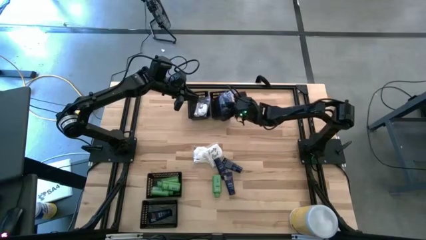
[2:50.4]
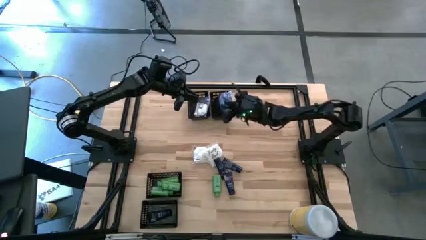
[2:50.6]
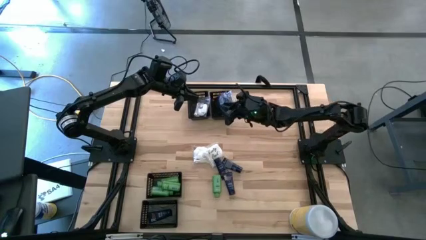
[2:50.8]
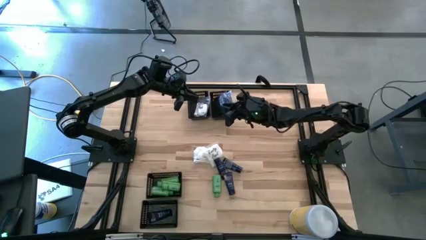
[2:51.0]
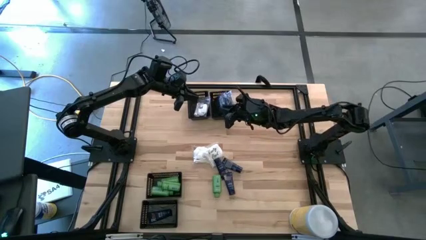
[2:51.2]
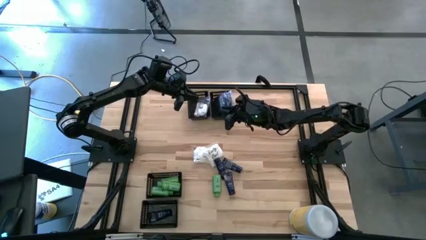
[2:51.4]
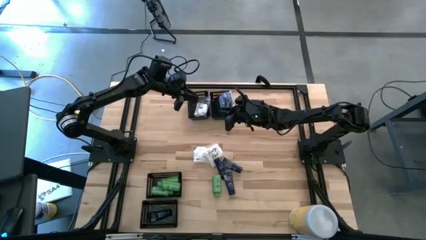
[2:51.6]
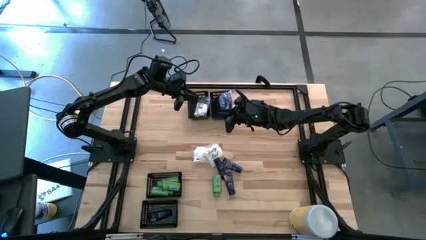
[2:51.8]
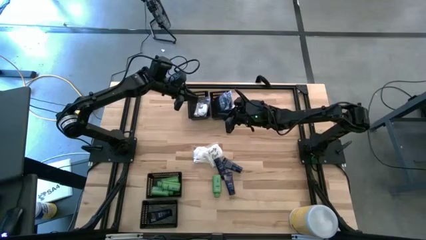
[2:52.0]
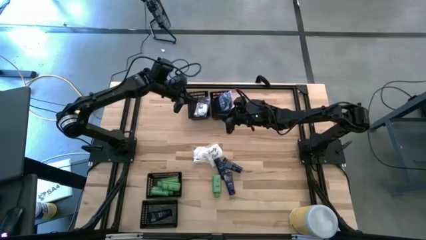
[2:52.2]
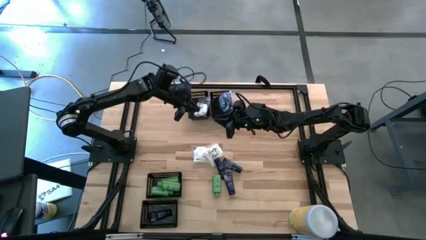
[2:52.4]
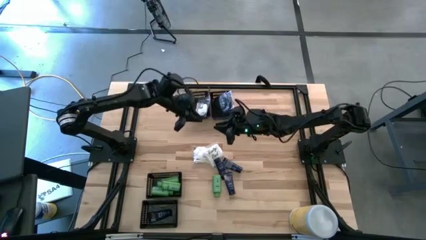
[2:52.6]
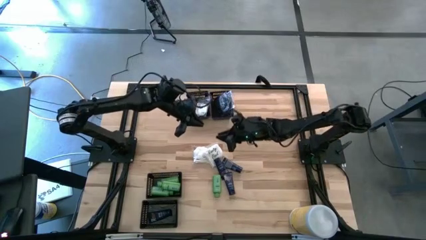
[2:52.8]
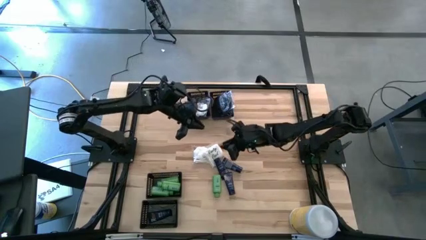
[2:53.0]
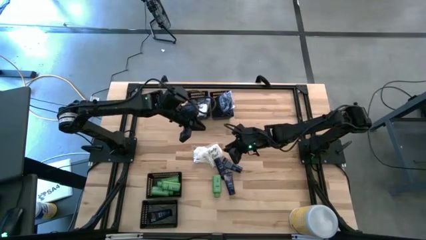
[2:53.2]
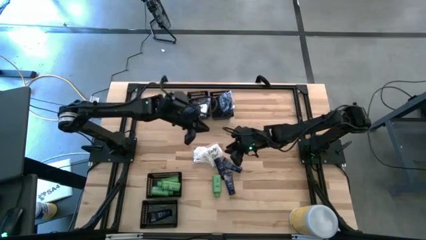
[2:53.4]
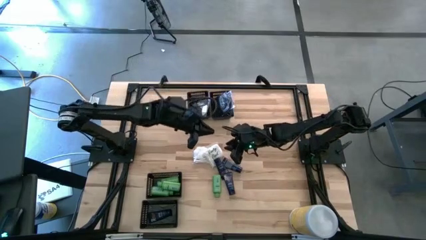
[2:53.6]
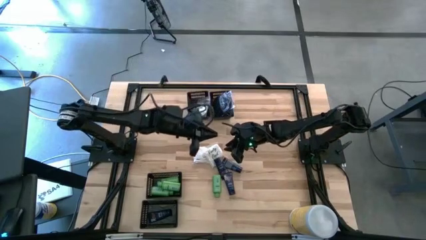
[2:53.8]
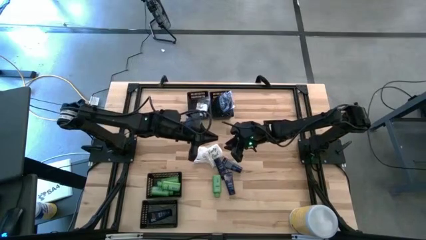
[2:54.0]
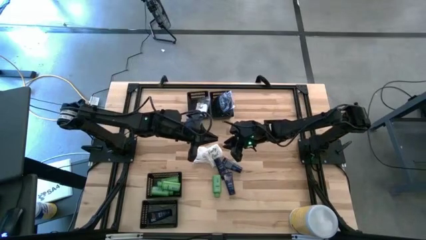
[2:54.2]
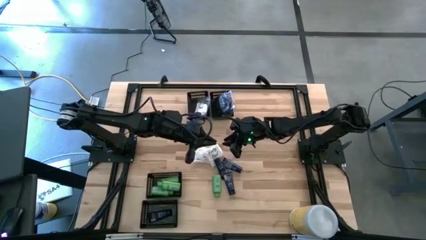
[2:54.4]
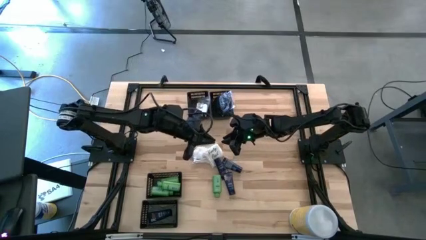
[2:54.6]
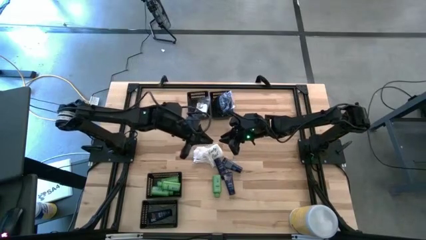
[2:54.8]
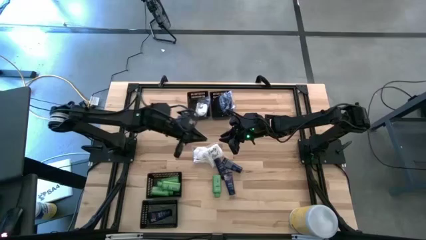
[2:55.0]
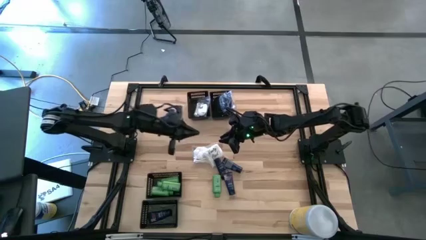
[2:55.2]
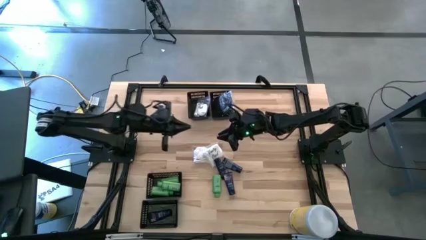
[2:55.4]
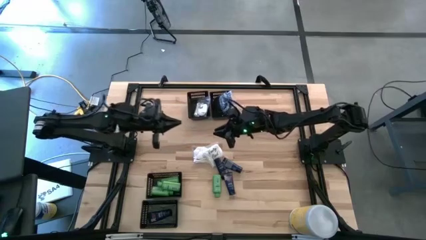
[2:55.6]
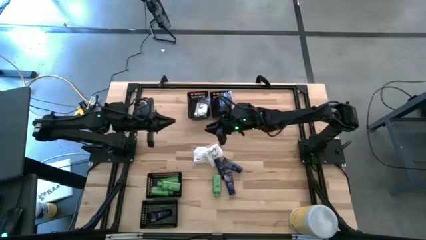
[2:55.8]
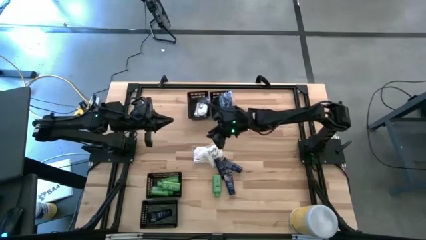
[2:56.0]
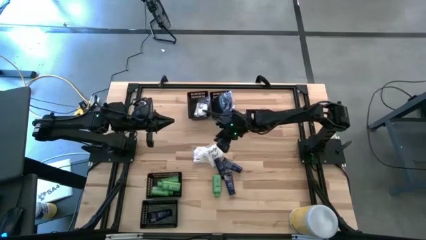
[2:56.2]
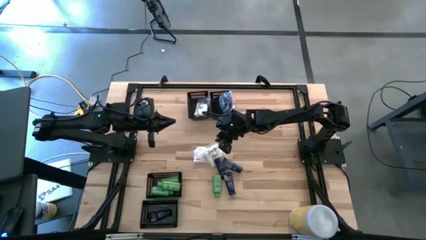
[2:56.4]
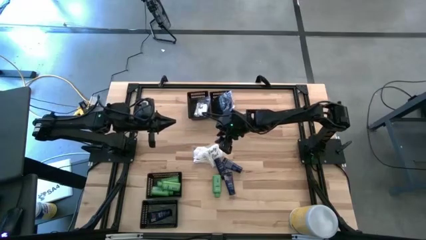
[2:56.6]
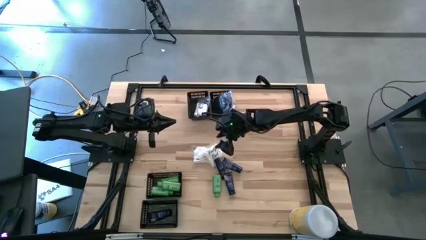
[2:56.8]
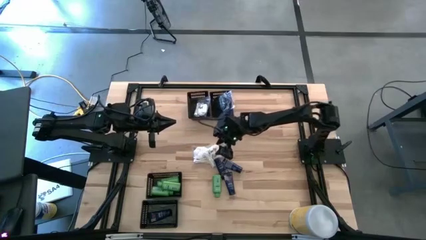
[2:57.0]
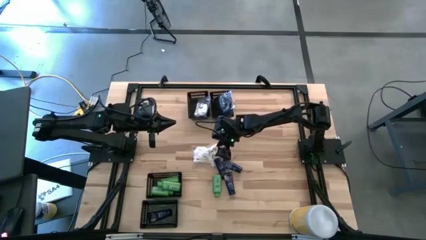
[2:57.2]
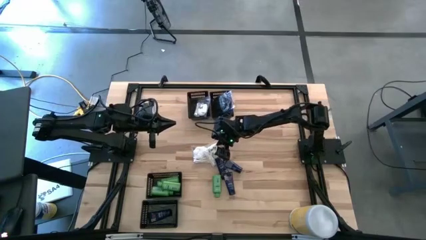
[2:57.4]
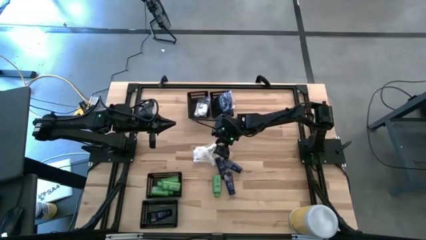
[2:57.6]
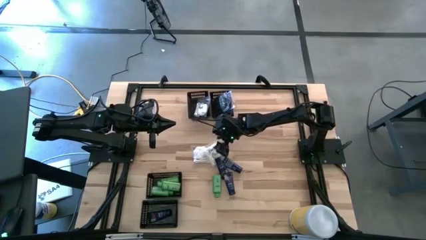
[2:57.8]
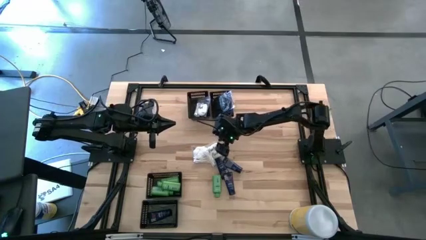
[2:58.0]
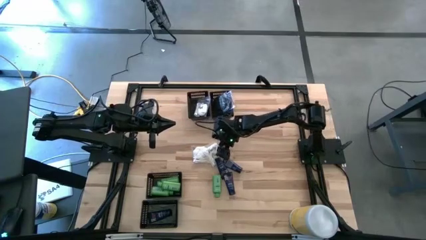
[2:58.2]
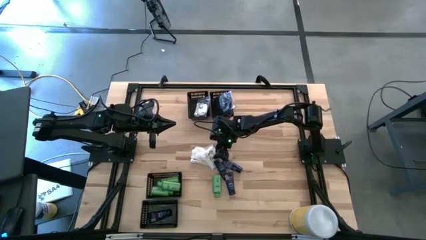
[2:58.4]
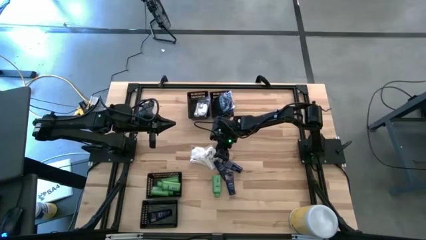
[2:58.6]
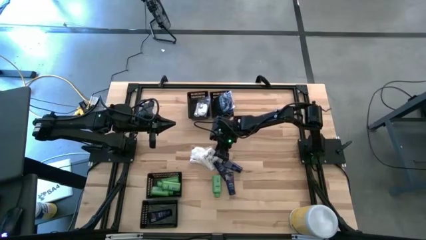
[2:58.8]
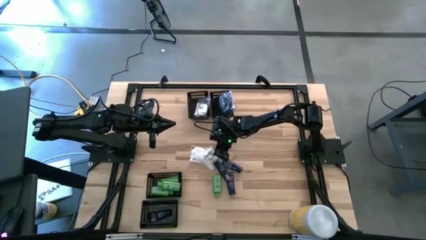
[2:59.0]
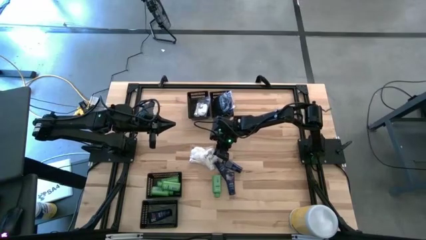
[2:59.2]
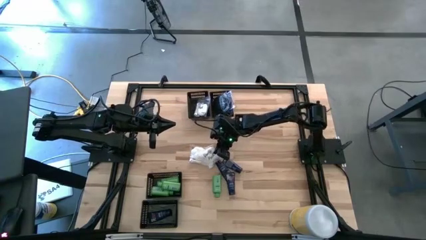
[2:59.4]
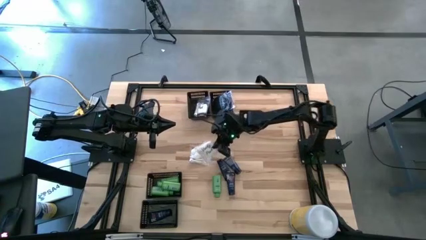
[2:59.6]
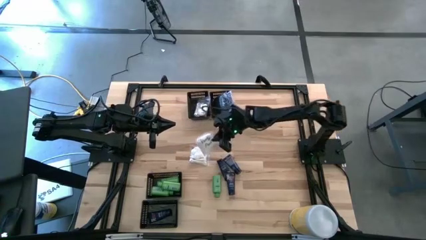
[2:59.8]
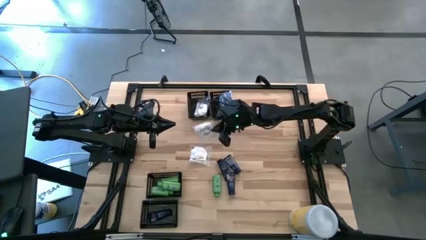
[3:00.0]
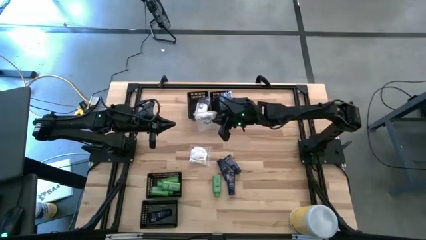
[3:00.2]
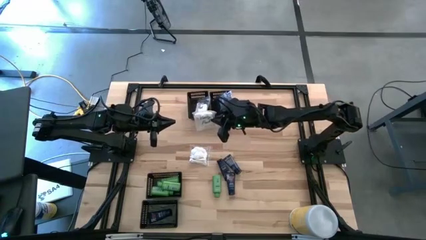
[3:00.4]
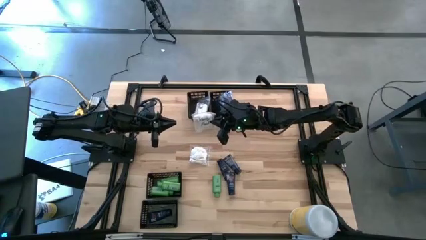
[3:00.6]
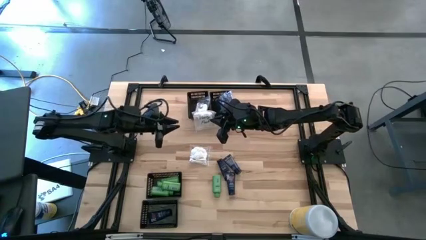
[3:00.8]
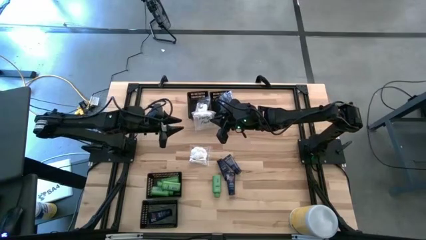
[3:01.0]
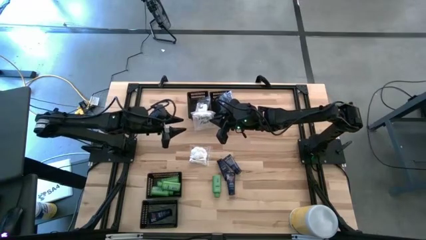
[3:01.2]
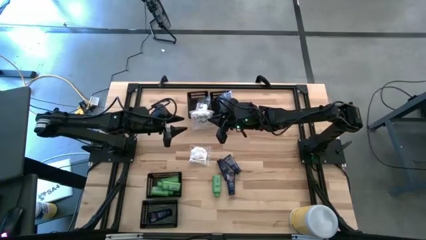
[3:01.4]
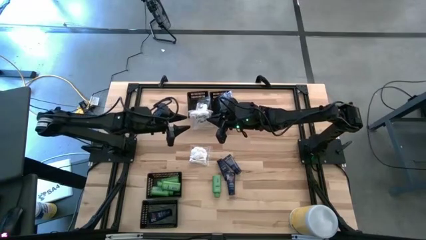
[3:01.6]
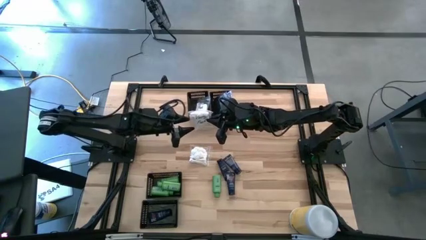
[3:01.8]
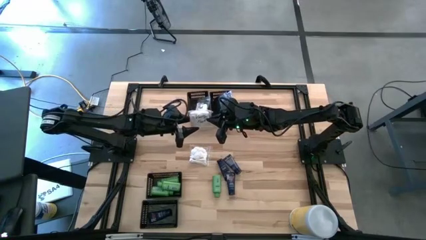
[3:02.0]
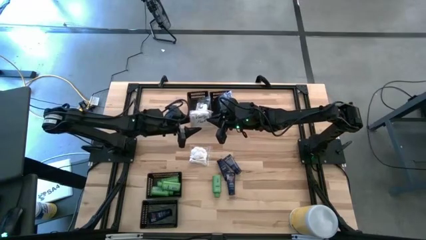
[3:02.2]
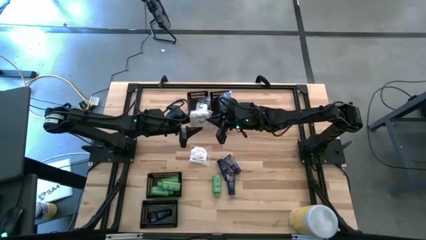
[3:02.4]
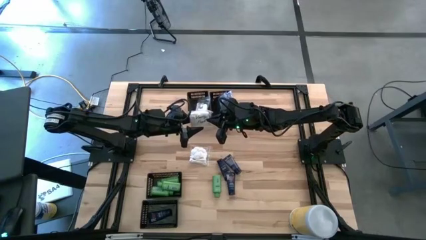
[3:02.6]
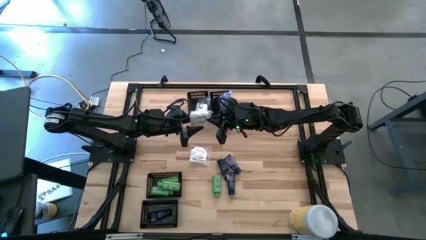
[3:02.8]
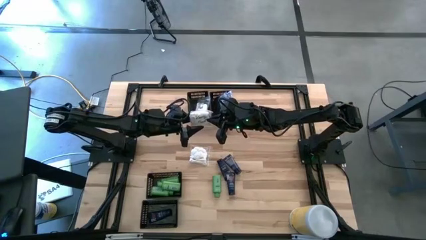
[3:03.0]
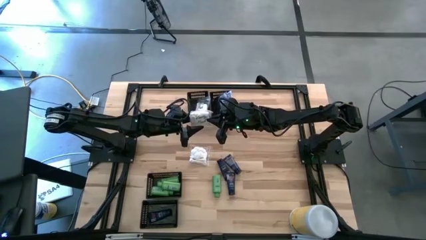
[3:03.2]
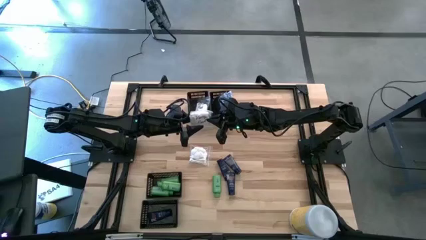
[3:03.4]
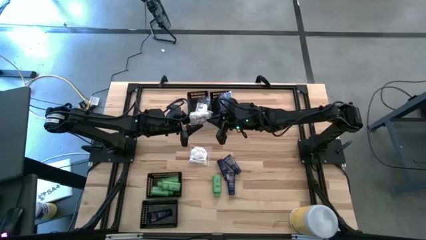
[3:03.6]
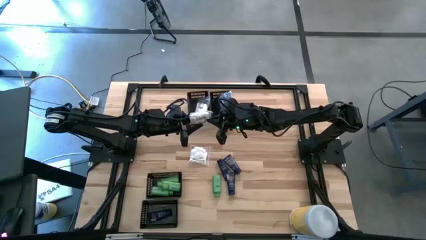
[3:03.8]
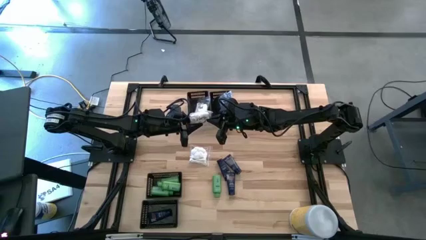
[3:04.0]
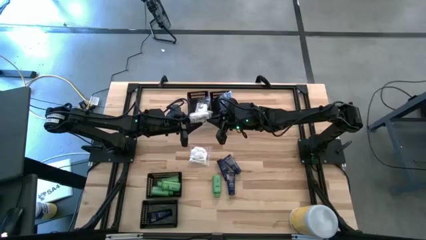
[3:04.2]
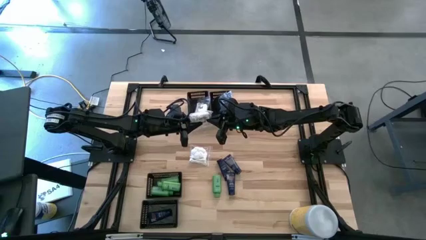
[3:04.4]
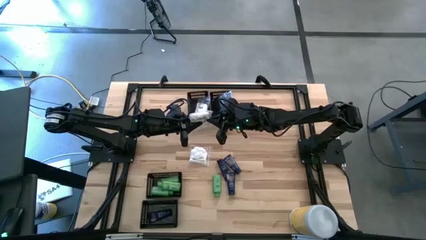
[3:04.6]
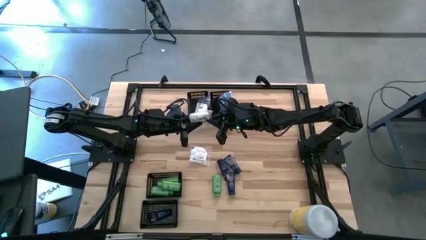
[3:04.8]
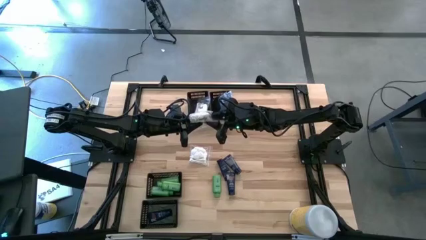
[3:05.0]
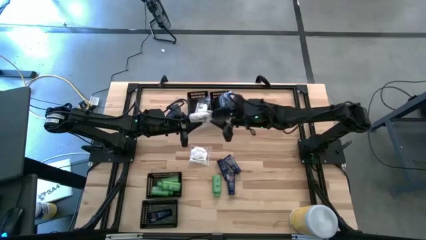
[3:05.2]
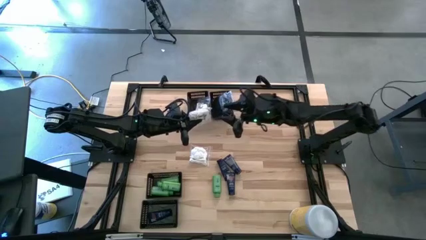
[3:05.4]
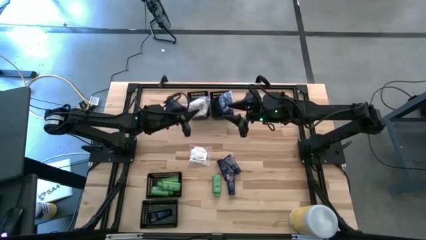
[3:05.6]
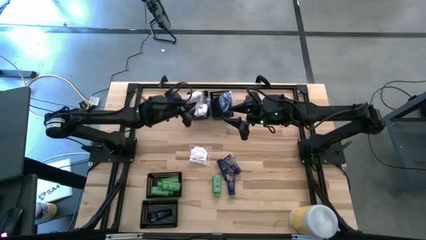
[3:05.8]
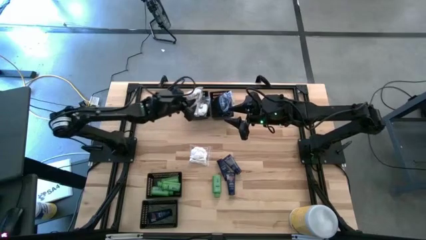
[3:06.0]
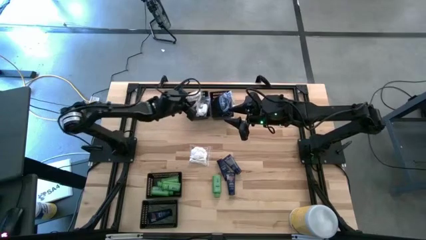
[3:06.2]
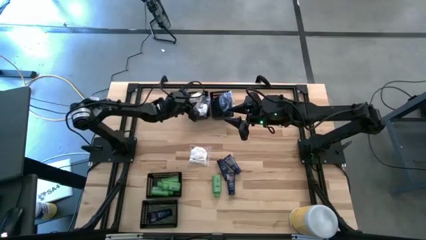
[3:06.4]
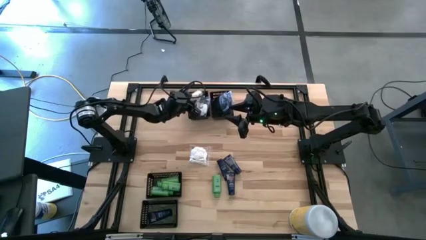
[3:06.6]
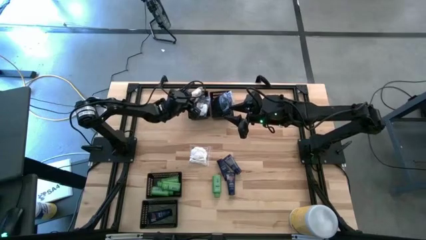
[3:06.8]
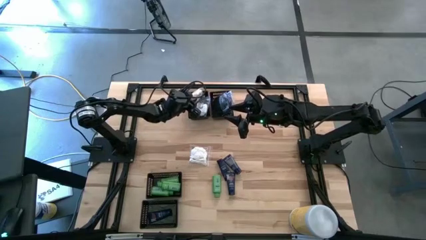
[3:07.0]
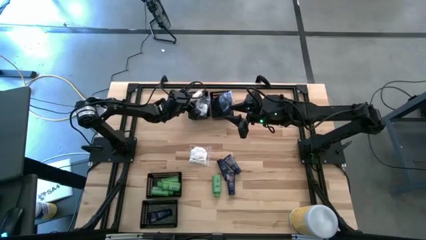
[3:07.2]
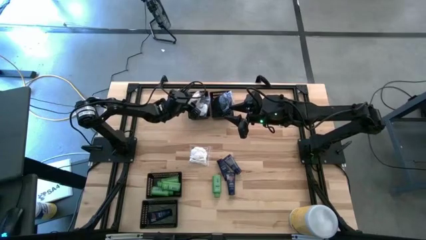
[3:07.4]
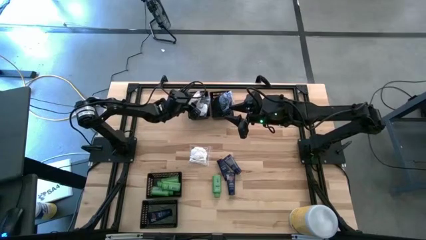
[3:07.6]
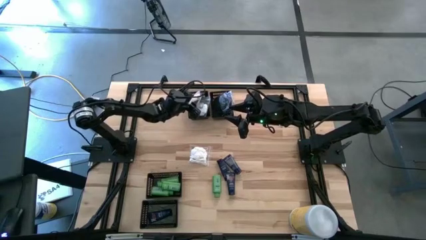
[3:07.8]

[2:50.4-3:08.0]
Task: Pick & Place Travel size toiletries
Put the white cotton pack into the top middle basket
